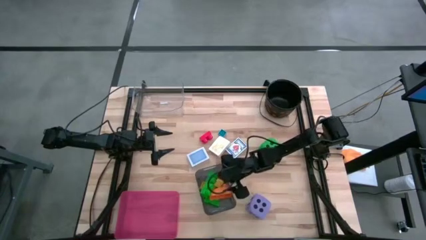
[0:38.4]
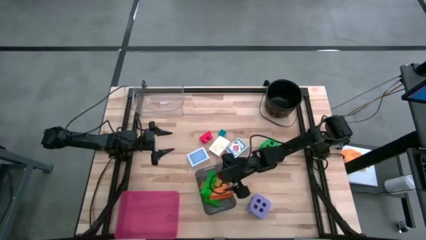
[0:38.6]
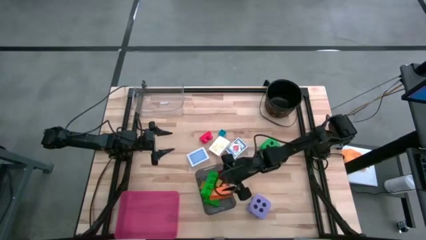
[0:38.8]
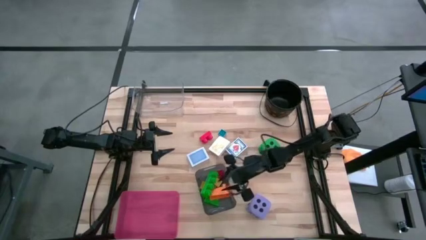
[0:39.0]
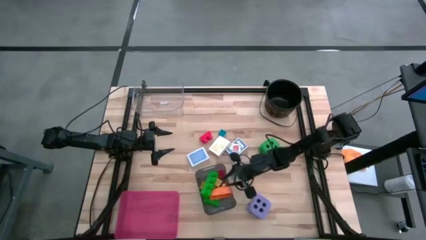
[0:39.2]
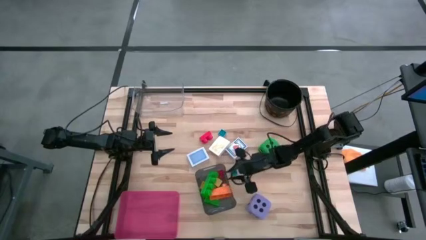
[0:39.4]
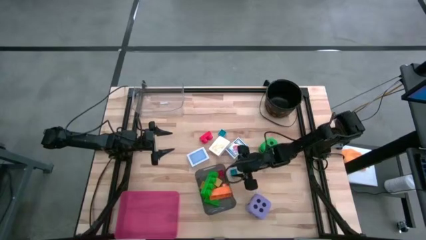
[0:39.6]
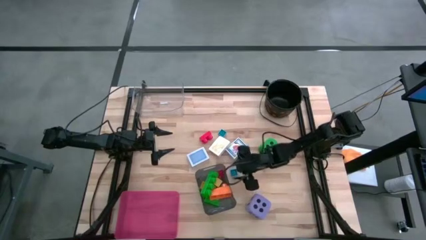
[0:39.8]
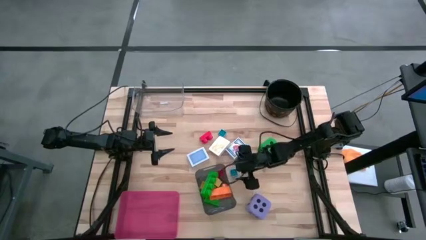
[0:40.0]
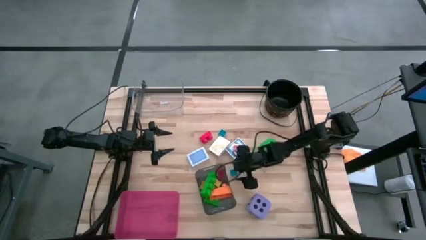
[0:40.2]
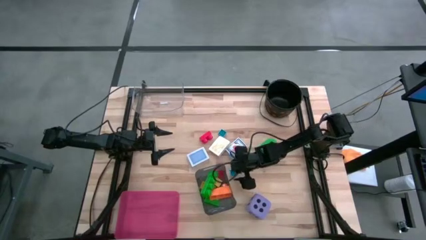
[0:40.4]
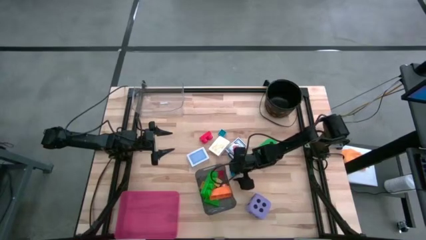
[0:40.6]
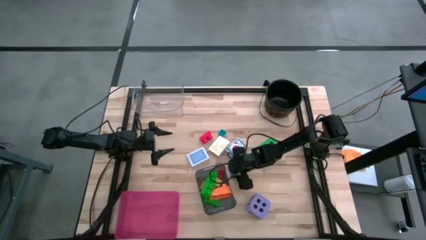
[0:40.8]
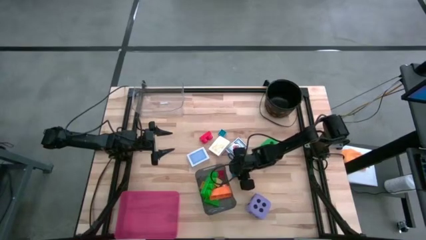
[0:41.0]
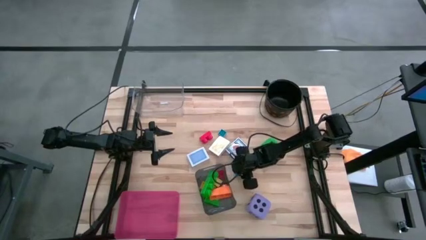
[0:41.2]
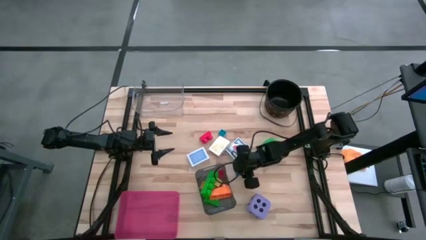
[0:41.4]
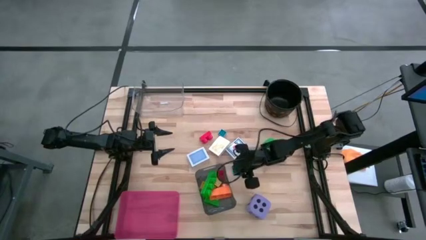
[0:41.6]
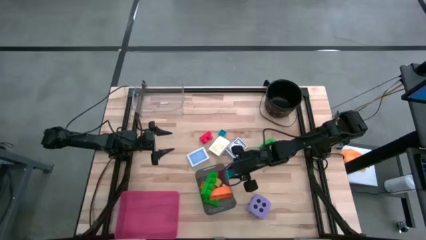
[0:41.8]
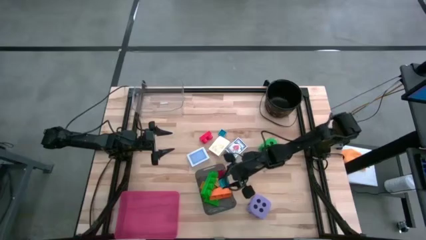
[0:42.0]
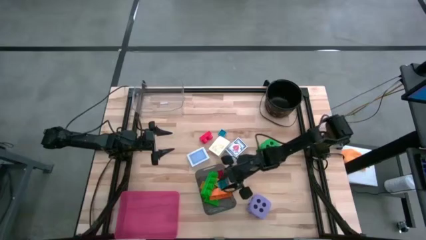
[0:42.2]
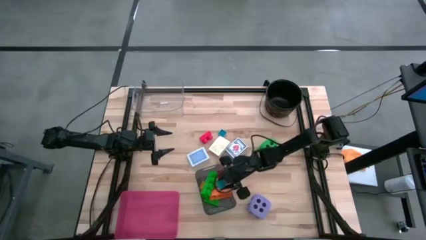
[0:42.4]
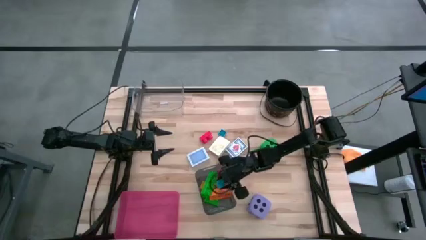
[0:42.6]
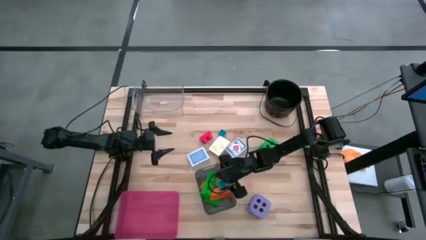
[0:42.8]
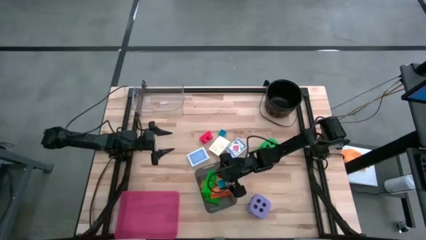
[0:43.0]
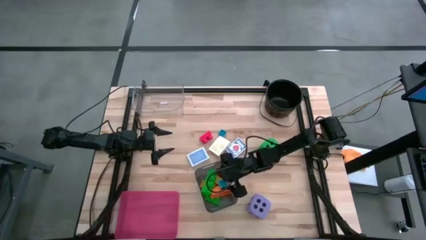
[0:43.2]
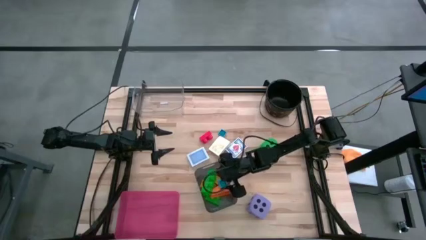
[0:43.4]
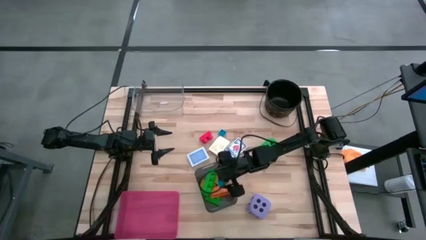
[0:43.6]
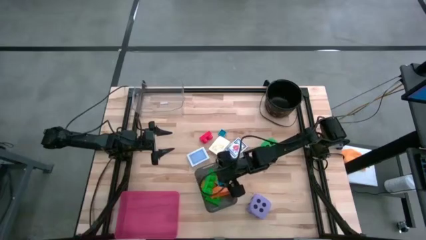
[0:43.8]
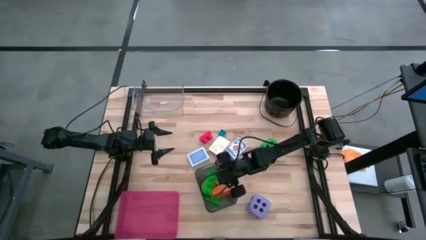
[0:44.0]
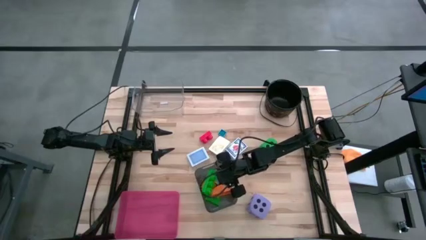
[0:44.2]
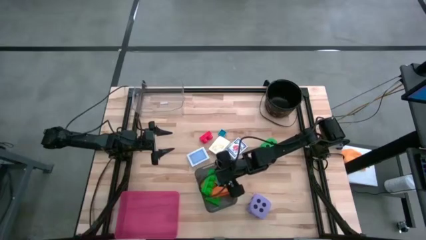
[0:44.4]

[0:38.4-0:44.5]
Task: Pick & Place Toys
Put the bottom blue game piece into the black bin

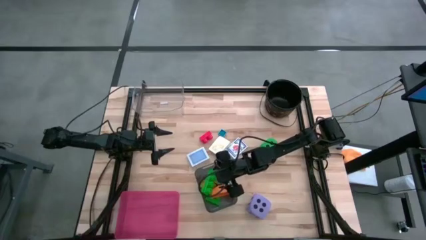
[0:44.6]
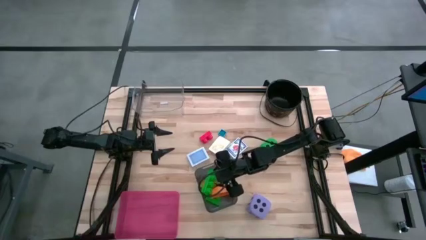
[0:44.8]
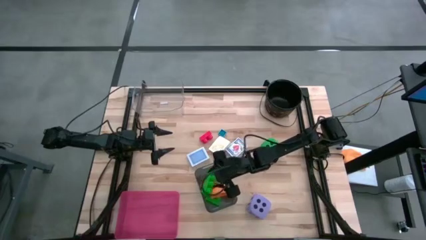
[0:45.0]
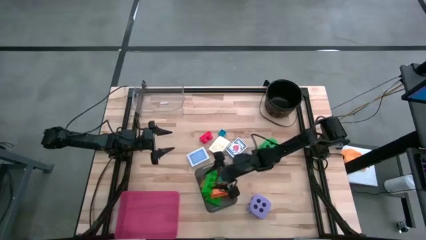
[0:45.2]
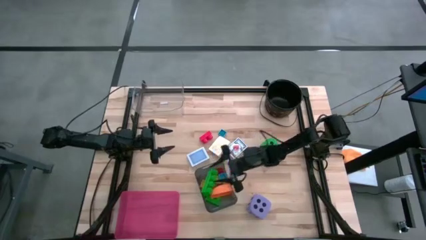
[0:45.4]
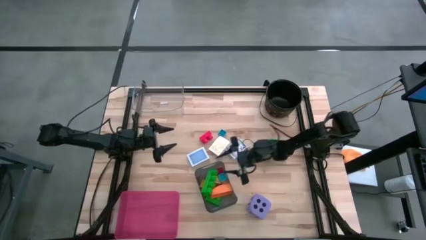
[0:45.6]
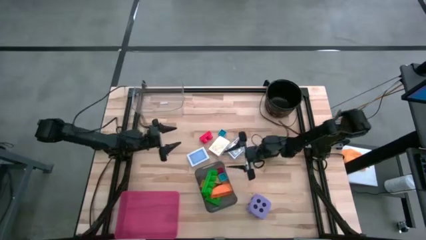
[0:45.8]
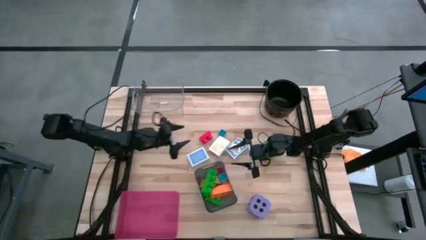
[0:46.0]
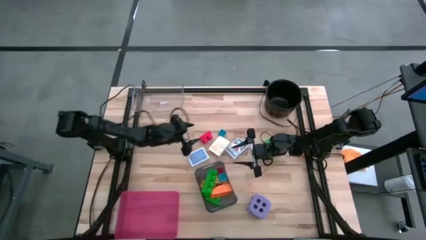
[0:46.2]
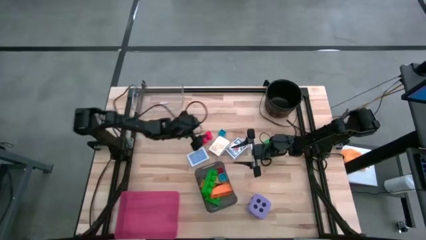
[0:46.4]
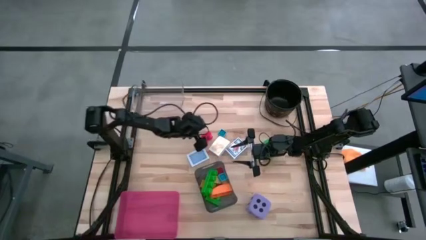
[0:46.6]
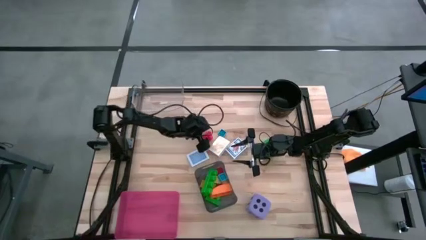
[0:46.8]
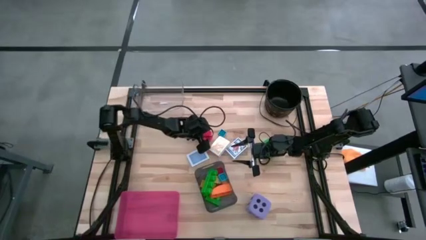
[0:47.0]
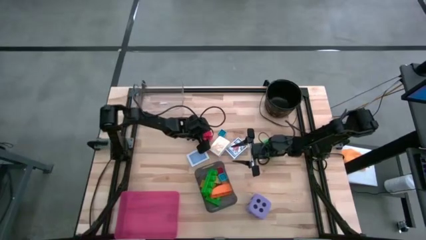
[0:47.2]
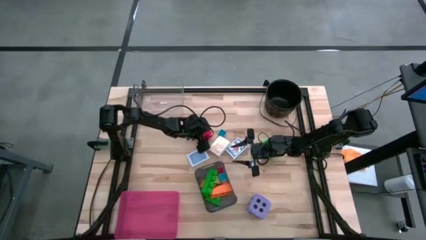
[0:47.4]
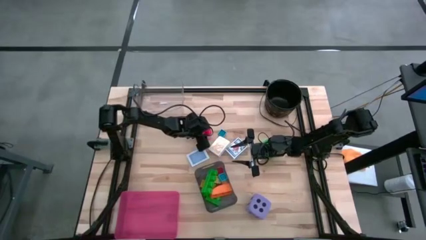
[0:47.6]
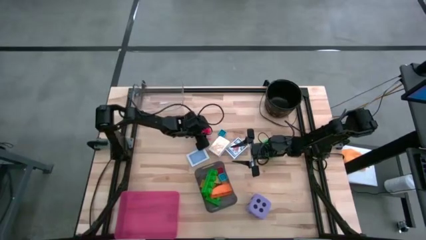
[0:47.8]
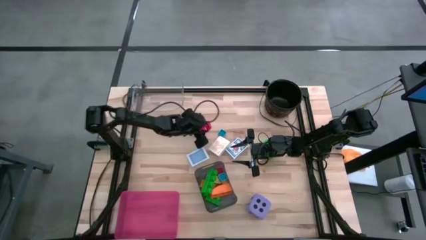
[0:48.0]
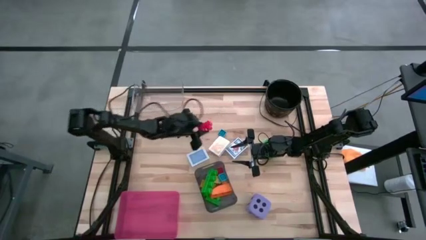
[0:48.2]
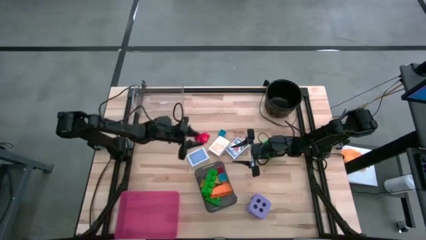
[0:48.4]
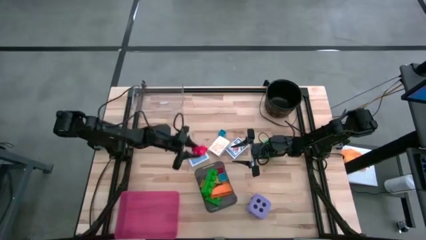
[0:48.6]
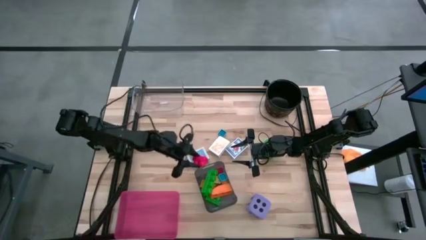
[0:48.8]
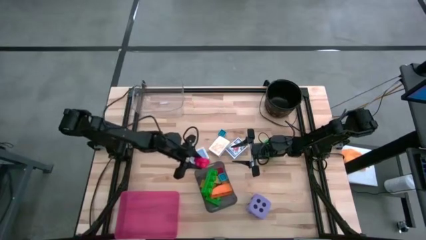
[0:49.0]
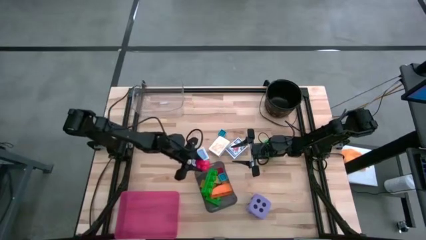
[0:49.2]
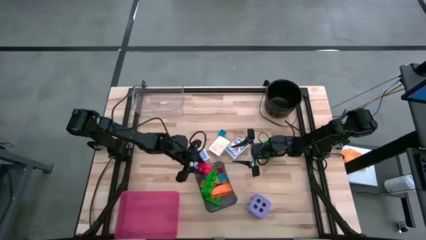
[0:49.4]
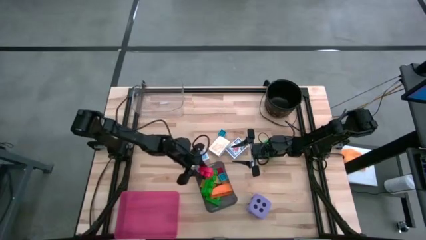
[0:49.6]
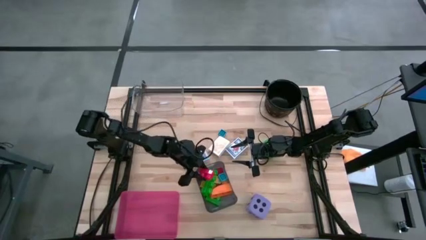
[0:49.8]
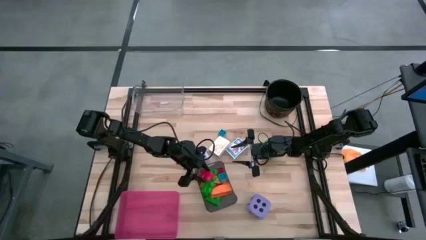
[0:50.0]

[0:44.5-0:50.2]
Put the red game piece into the black bin

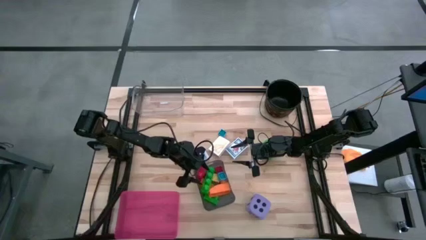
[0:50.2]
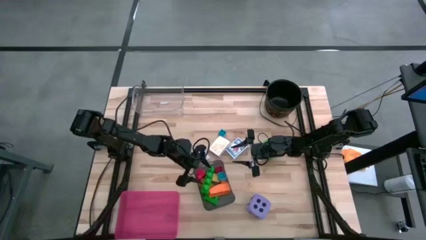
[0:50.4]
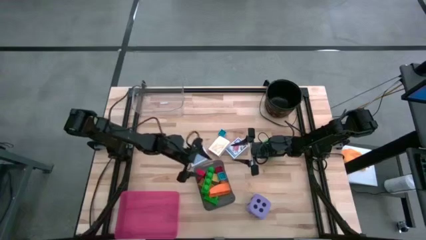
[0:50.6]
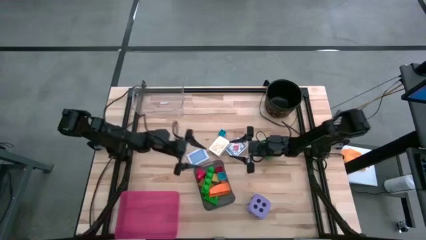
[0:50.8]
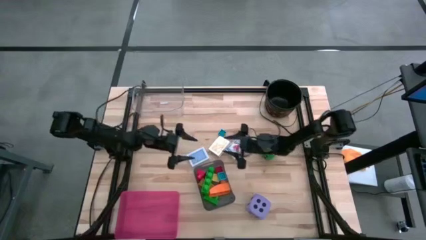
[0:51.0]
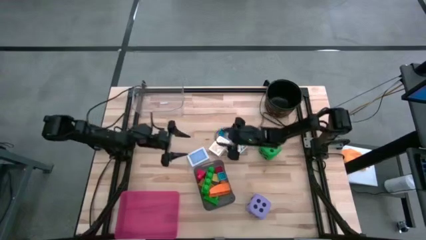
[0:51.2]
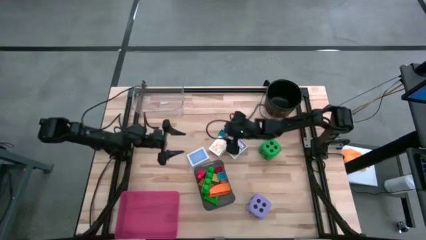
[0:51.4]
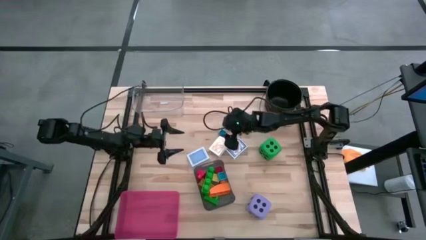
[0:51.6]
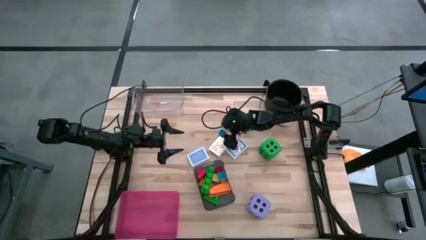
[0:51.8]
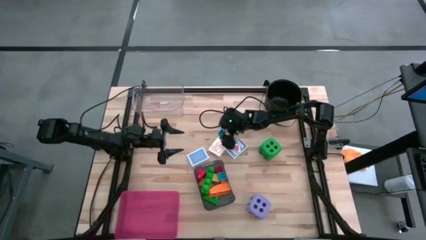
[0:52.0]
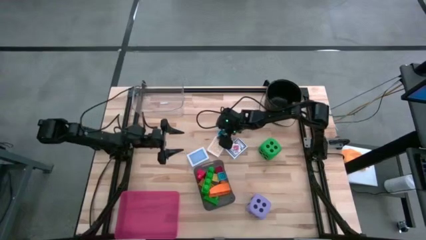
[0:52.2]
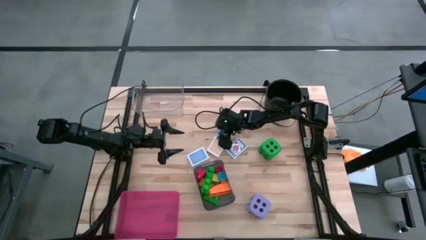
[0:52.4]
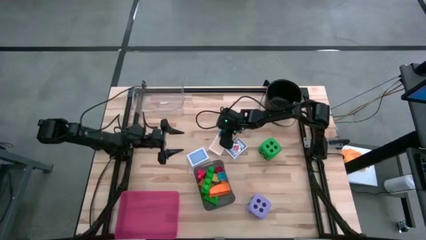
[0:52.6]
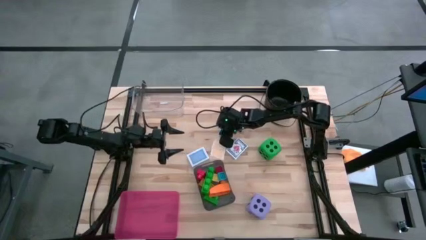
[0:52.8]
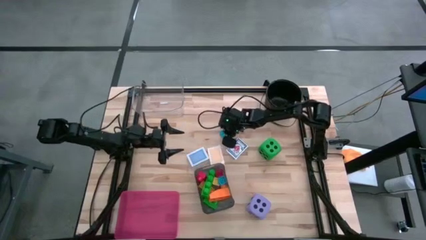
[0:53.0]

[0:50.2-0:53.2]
Put the blue game piece into the black bin

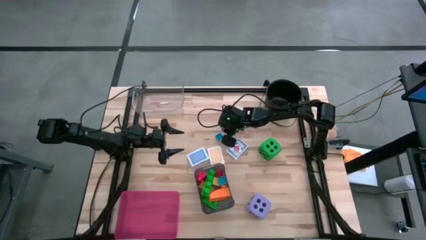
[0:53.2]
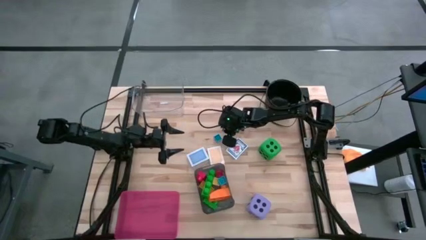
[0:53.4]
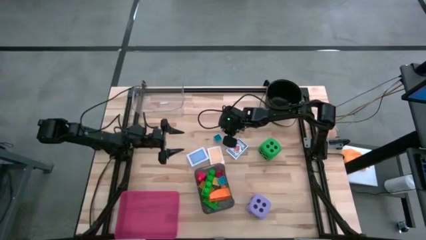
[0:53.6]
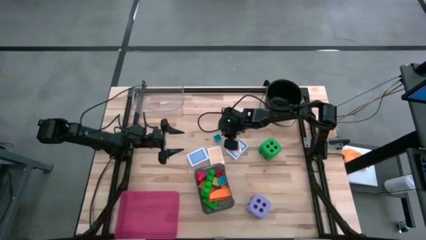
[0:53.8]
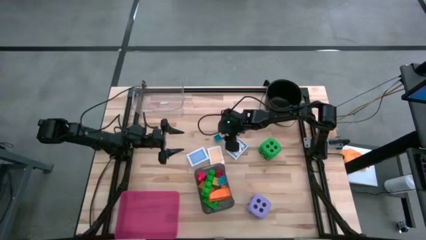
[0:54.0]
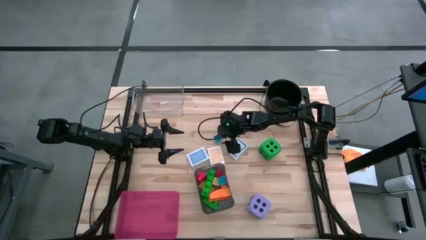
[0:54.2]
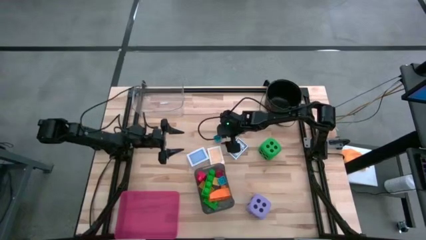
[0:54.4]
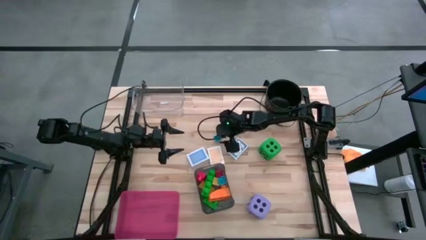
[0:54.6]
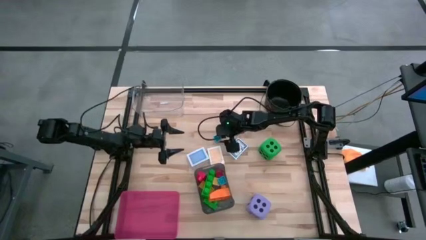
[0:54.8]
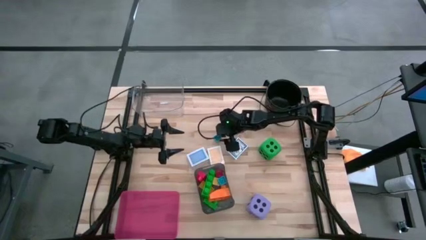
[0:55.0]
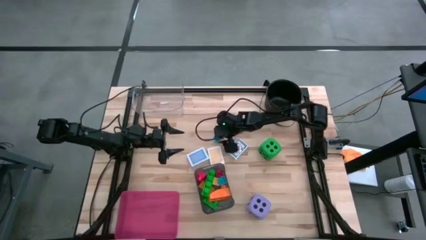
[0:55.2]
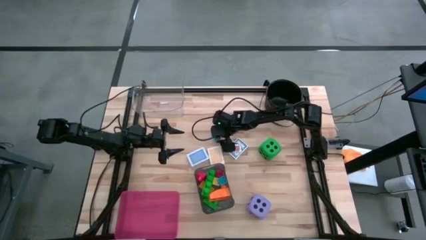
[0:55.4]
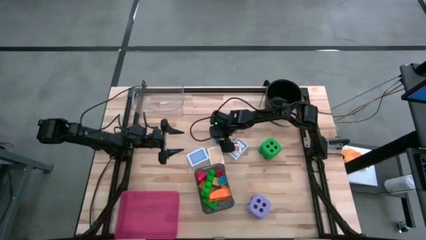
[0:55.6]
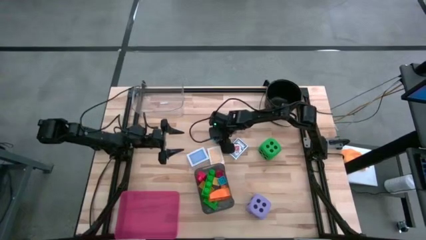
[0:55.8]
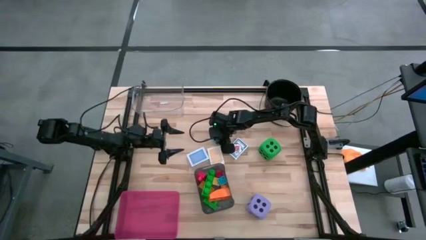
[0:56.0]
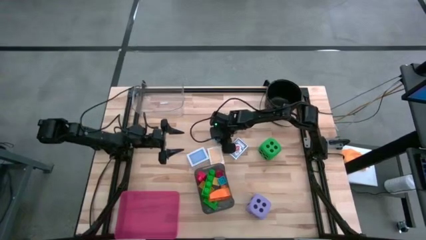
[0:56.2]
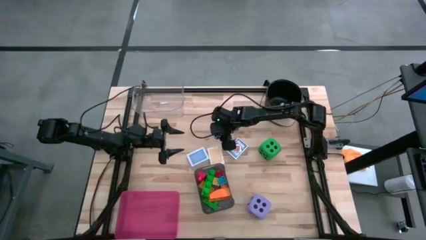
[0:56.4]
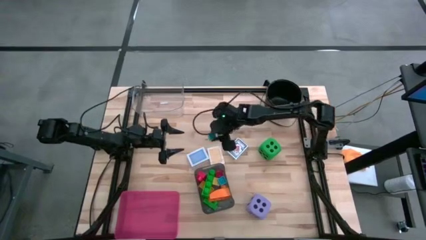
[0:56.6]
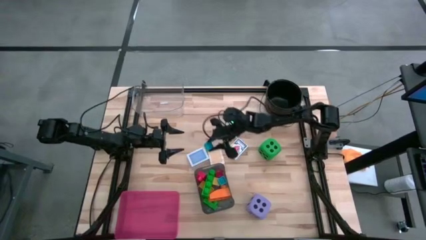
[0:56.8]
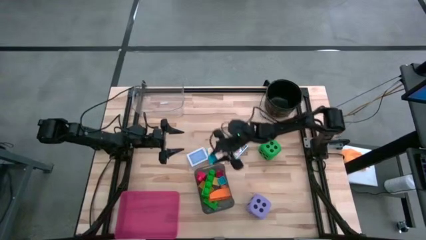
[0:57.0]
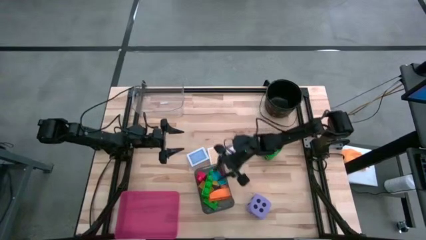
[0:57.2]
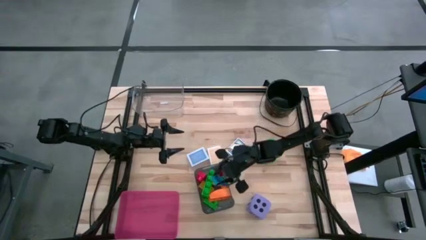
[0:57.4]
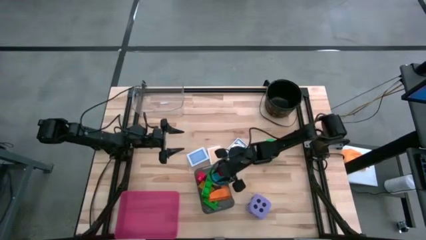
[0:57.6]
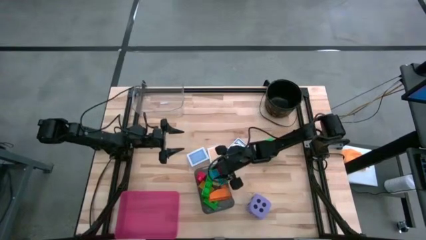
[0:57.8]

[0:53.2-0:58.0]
Put the blue game piece into the black bin
